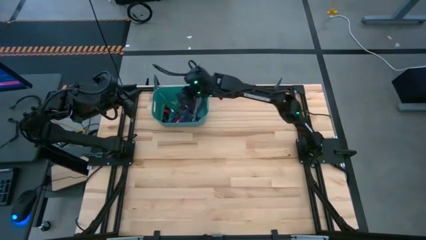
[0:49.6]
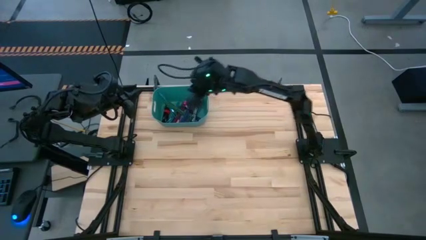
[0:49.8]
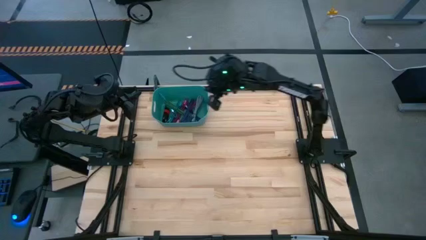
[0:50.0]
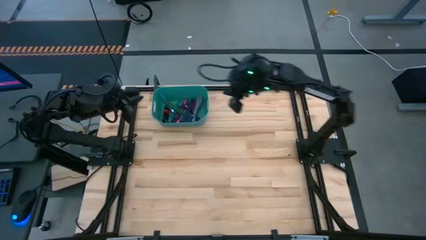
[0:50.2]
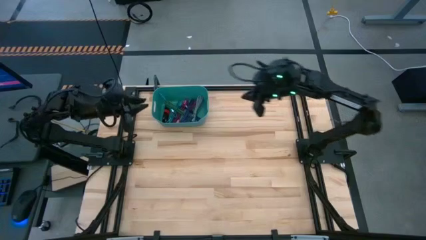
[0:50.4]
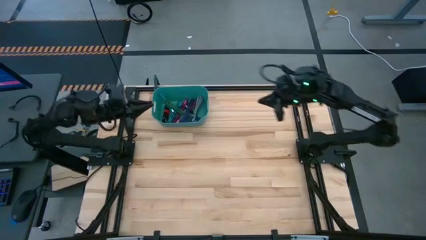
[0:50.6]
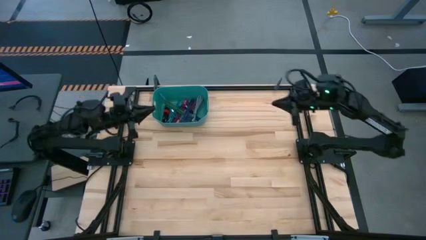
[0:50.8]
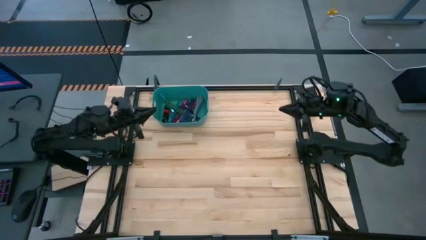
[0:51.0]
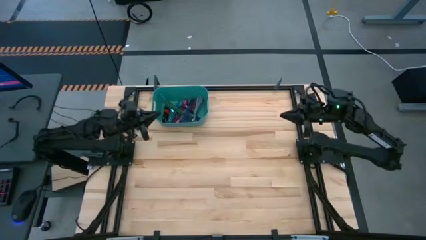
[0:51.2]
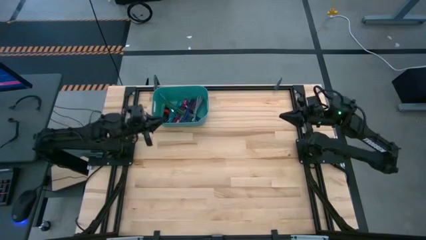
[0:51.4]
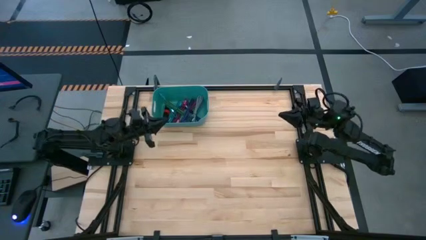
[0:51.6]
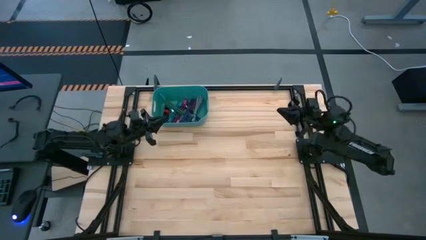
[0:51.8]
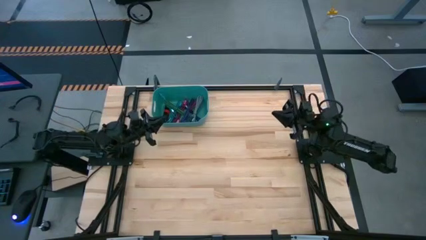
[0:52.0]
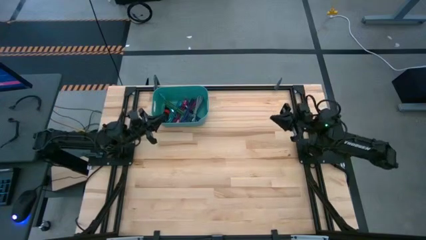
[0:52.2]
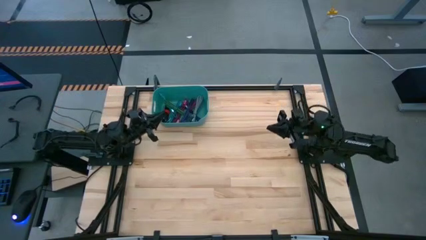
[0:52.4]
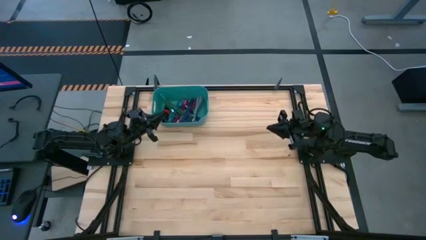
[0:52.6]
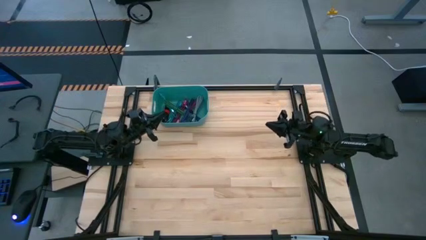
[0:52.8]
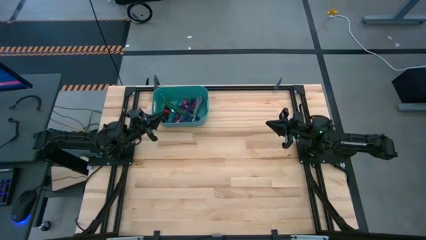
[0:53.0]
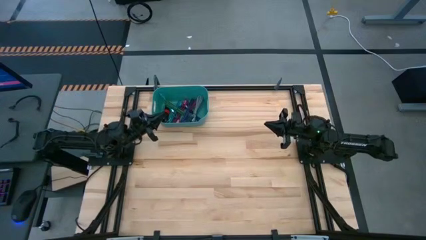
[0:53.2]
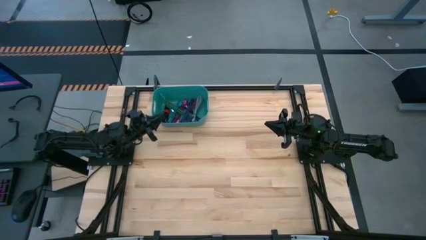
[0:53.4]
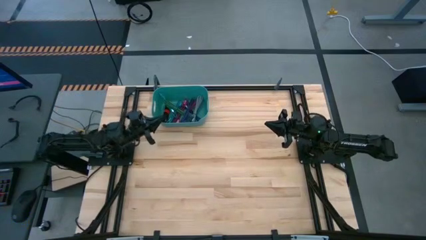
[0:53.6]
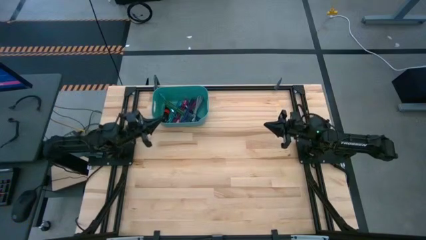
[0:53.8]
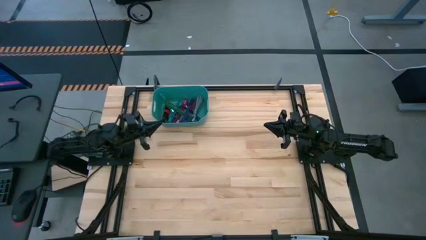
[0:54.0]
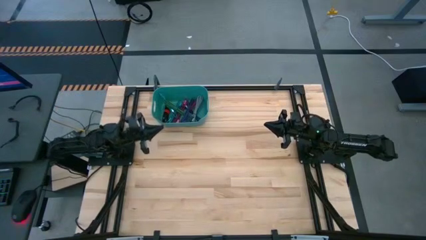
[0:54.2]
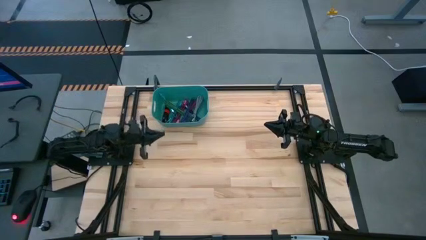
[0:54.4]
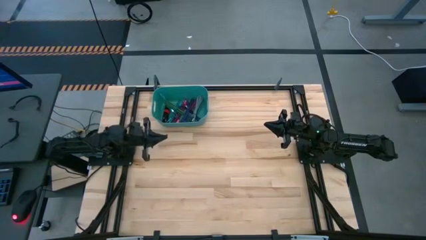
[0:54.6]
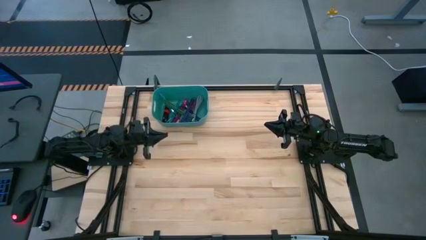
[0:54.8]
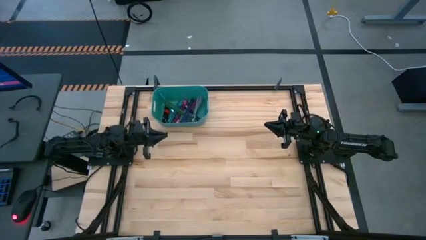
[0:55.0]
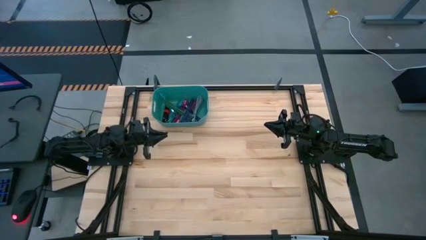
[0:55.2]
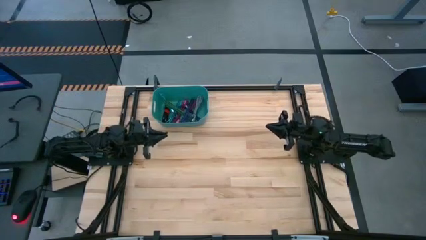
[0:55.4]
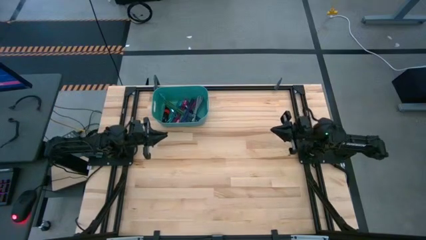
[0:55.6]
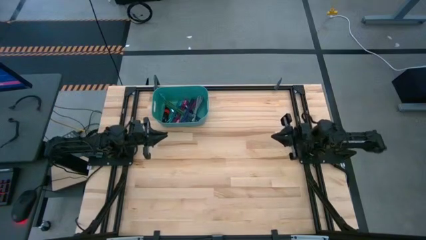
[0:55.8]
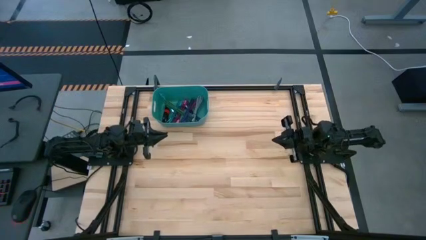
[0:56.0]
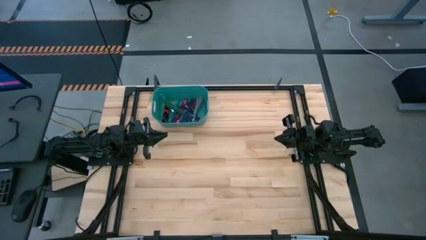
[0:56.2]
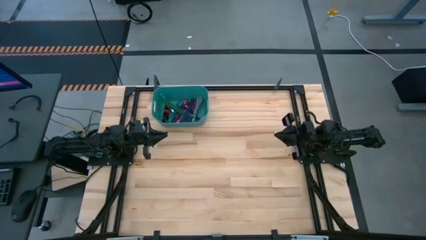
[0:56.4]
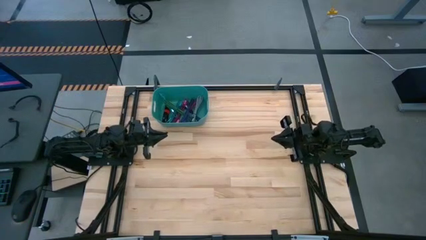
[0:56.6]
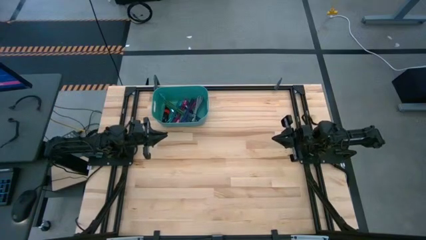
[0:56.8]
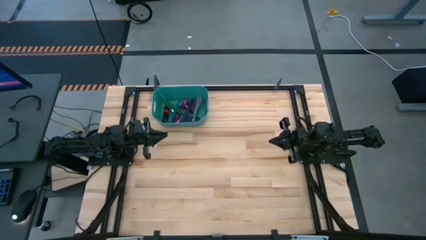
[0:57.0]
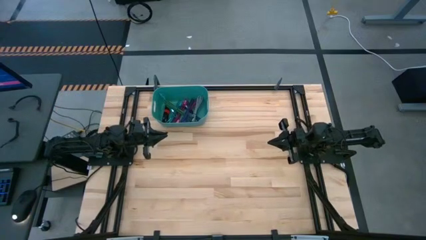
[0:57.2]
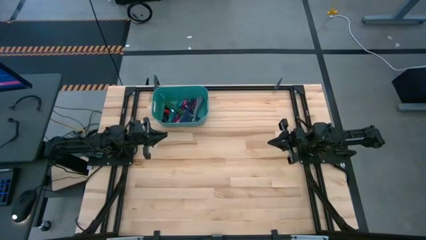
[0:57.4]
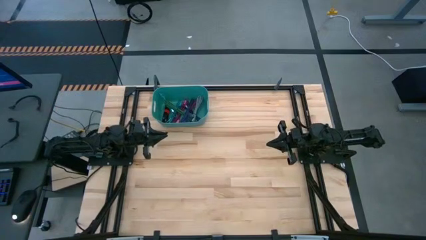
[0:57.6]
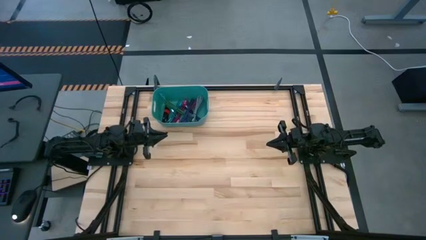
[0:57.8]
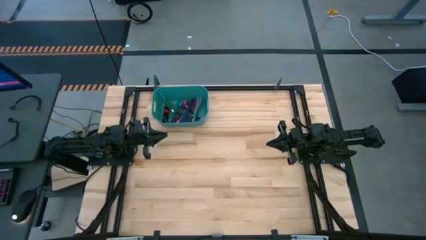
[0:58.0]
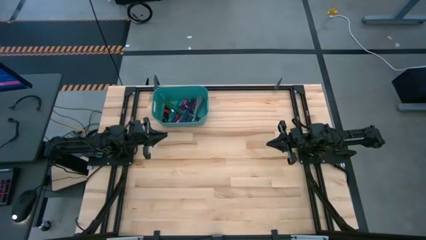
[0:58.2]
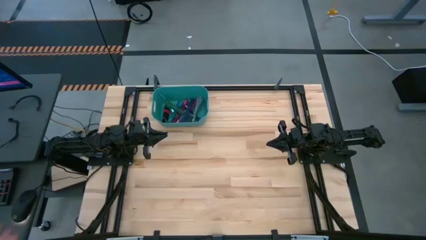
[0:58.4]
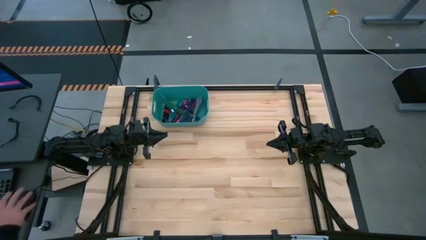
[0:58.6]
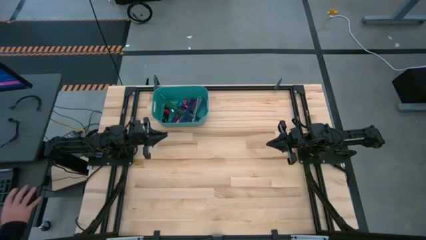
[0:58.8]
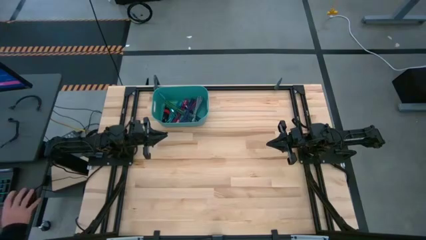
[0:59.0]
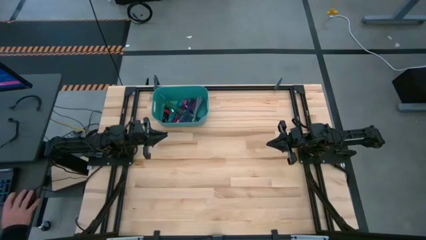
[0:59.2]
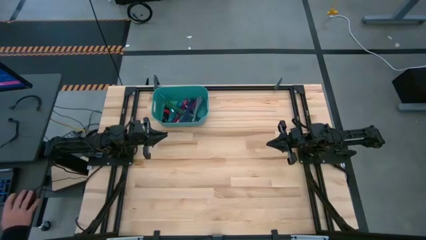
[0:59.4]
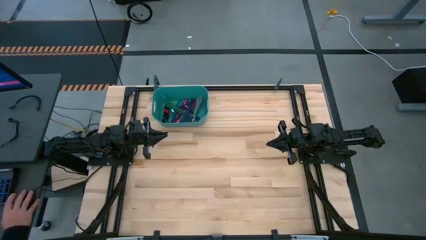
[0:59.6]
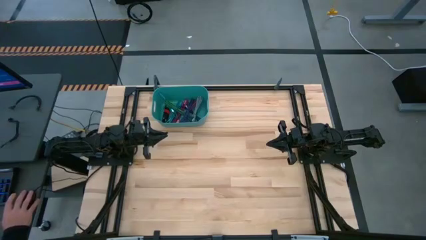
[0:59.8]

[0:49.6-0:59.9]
Task: Pick and place USB-C Cables
Return to Home Position

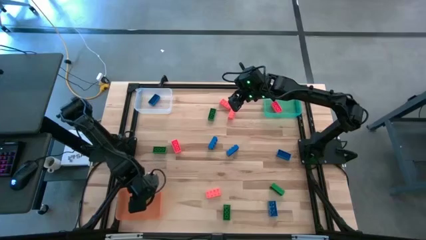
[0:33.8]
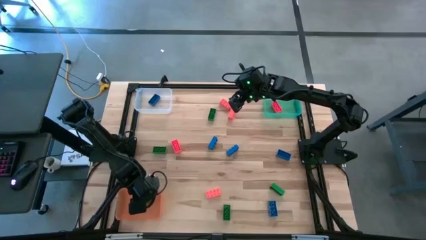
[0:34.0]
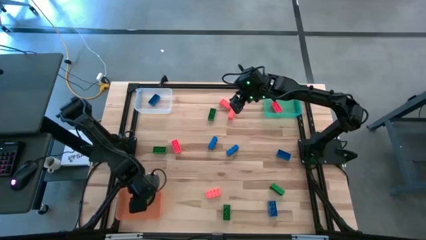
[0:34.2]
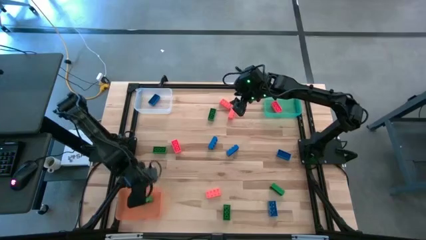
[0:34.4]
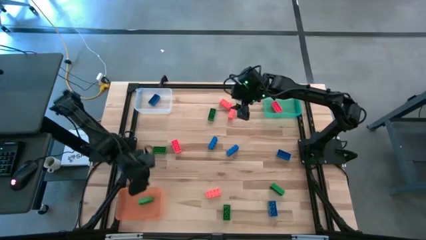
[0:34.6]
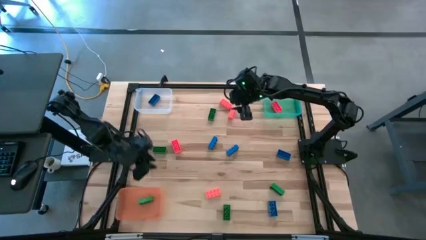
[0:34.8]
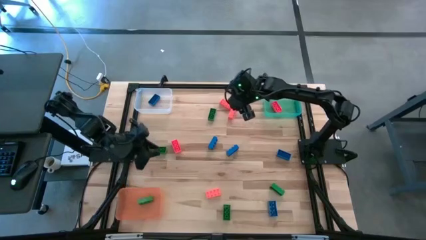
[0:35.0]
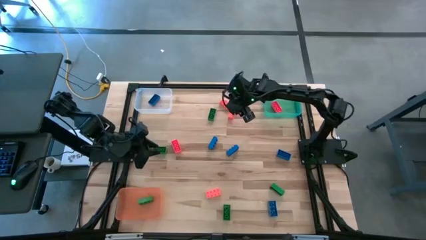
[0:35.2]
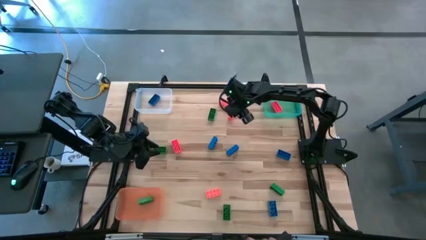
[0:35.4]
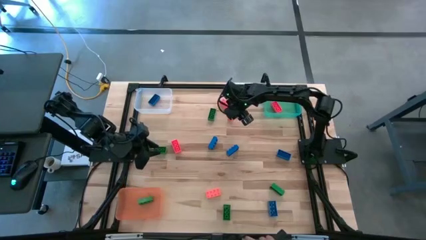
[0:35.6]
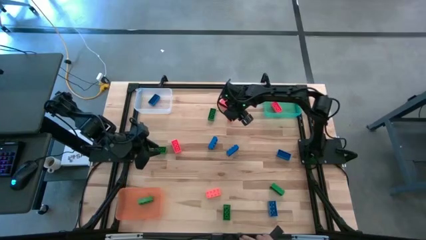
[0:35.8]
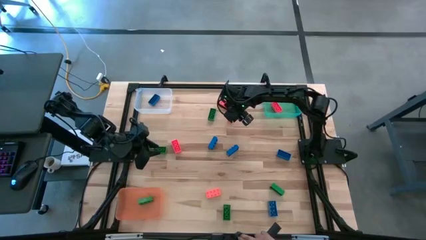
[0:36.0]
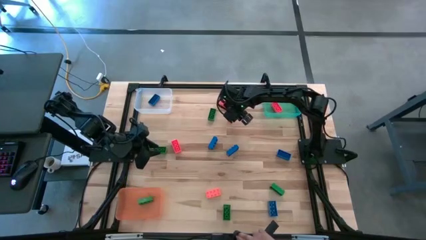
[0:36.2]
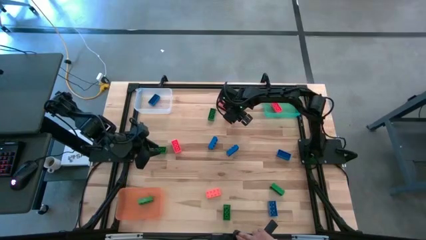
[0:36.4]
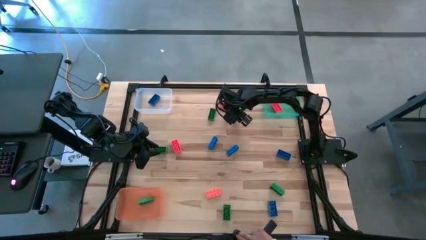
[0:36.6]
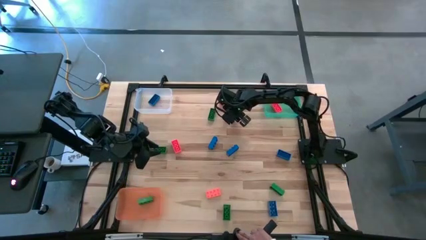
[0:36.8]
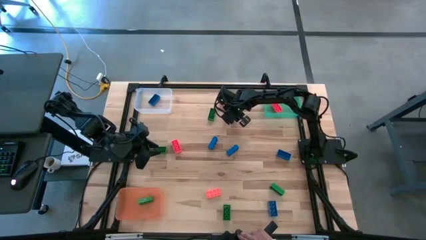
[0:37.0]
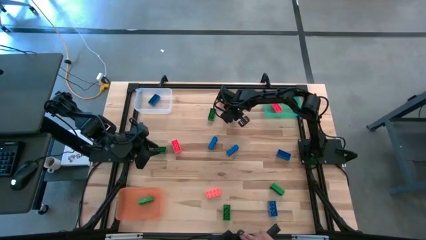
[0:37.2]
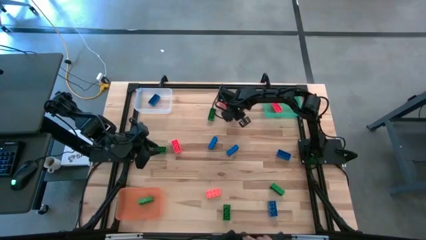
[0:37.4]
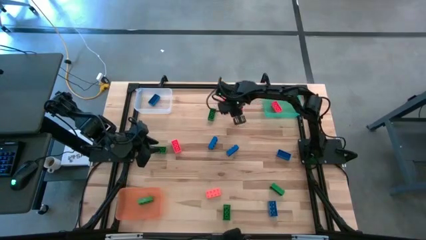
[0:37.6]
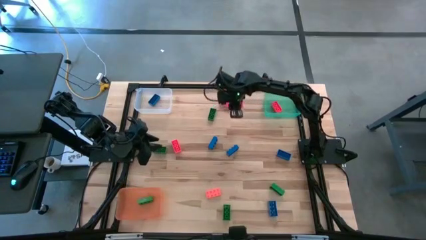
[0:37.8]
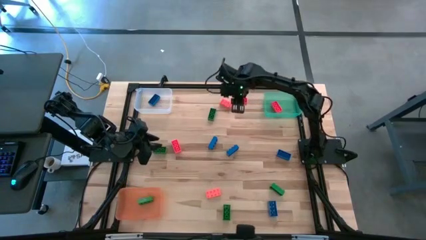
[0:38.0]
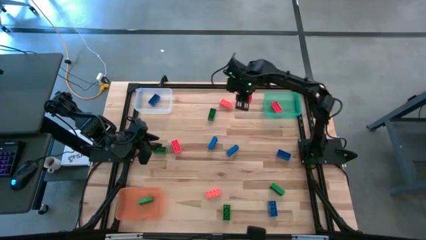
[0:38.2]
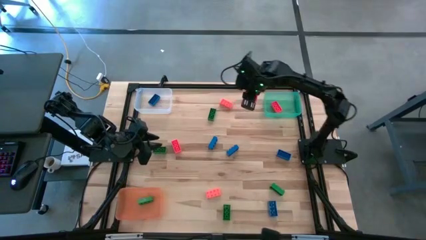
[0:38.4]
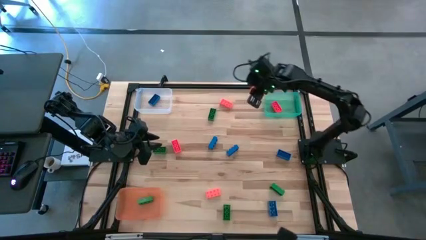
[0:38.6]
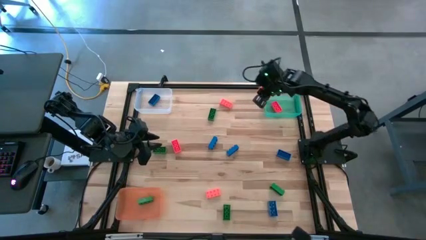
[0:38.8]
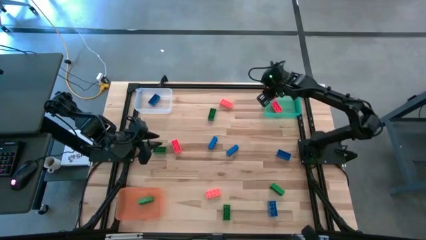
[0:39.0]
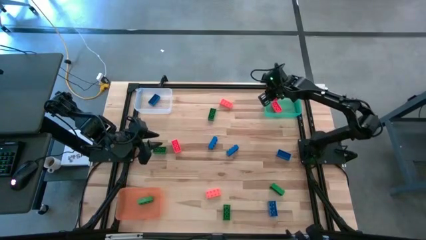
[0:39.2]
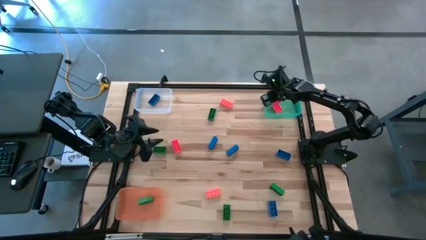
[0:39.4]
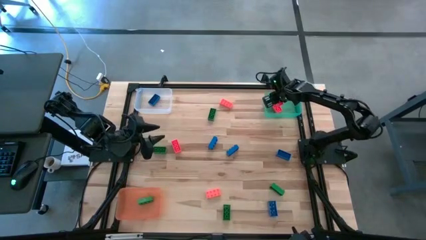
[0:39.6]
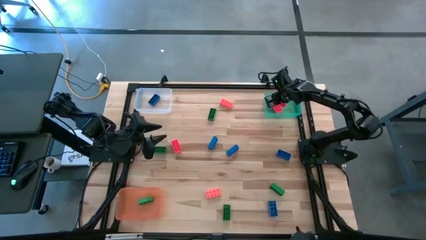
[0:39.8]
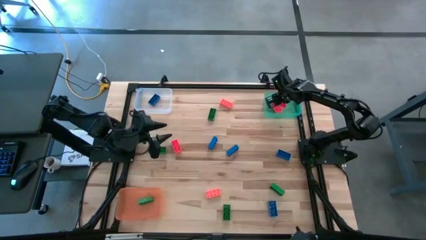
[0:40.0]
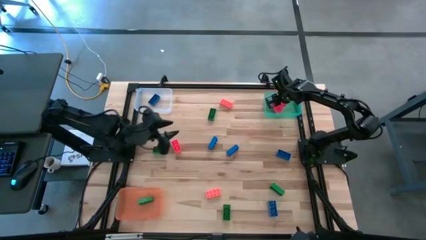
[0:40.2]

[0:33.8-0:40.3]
Task: Sort & place blocks by color
Put the orange game piece into the light blue bin
